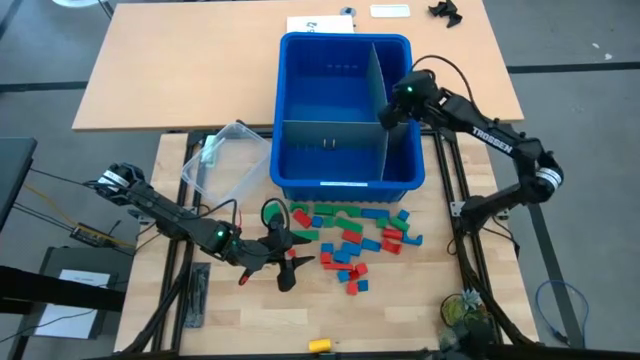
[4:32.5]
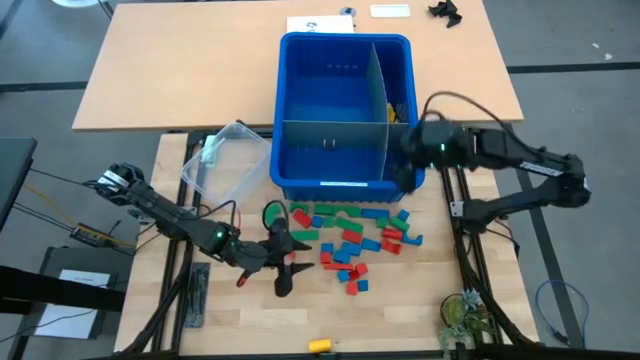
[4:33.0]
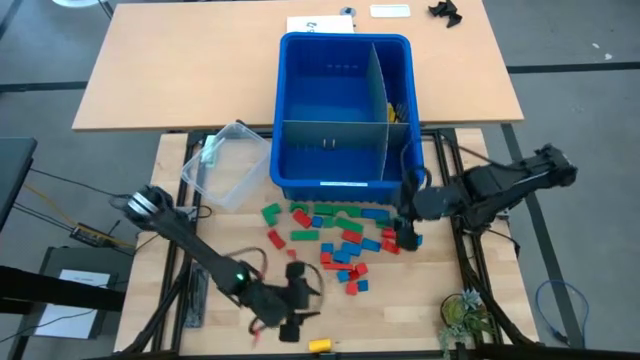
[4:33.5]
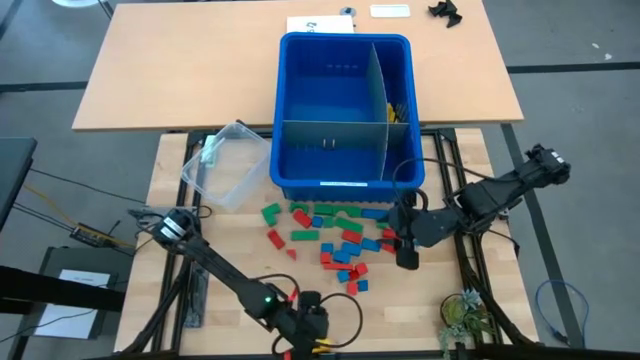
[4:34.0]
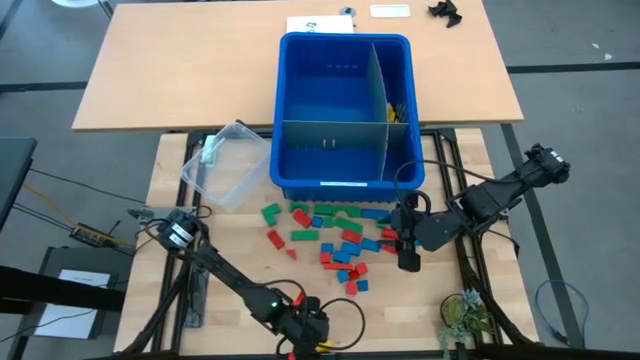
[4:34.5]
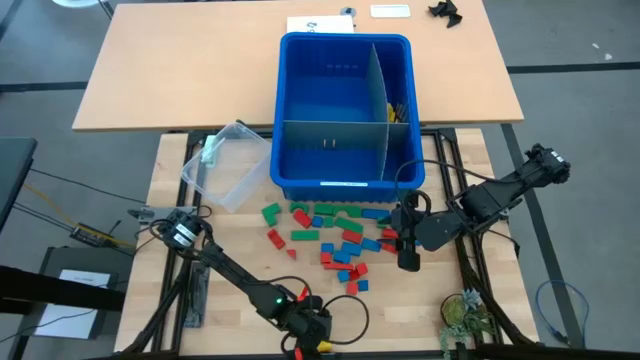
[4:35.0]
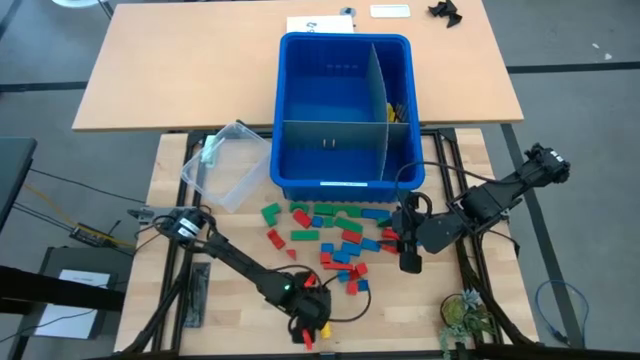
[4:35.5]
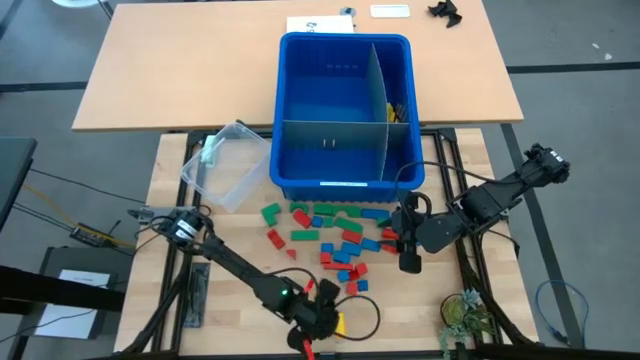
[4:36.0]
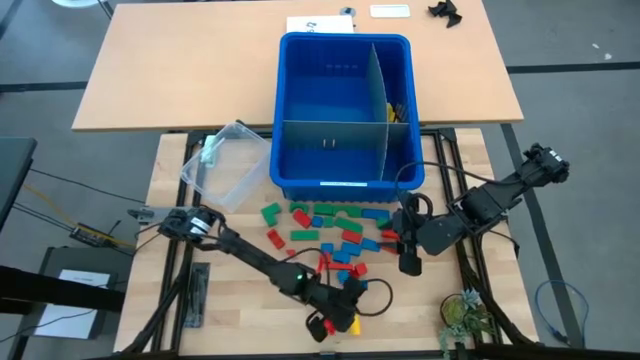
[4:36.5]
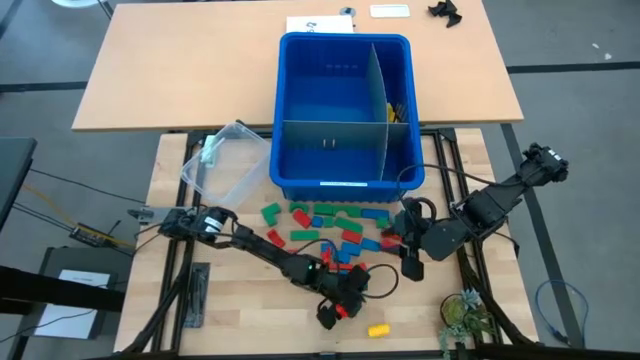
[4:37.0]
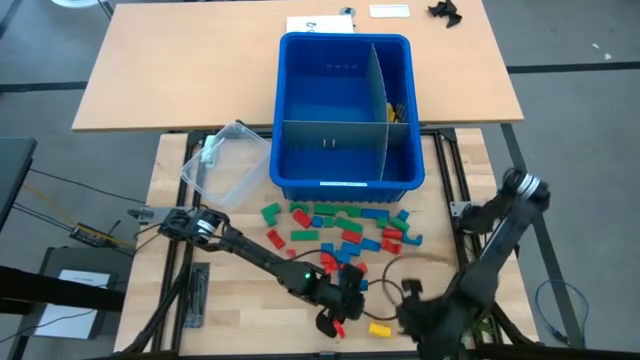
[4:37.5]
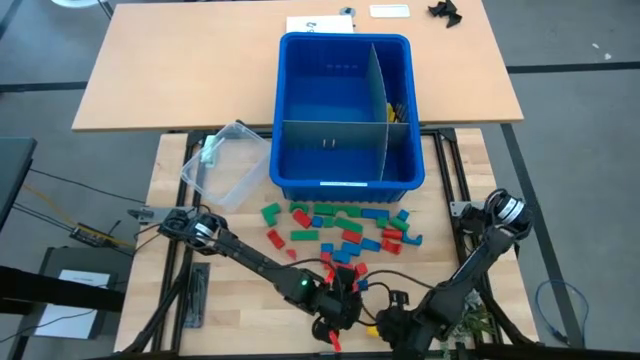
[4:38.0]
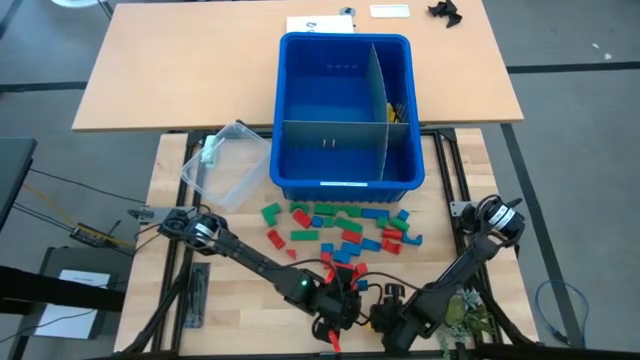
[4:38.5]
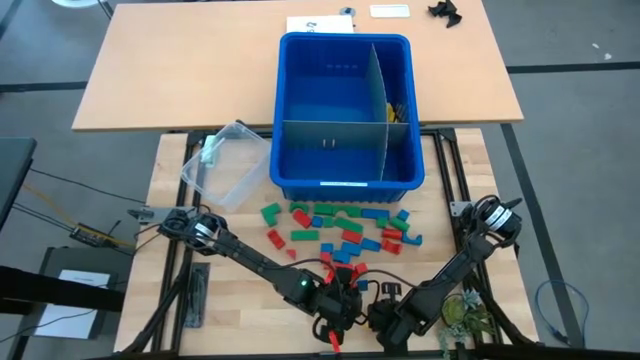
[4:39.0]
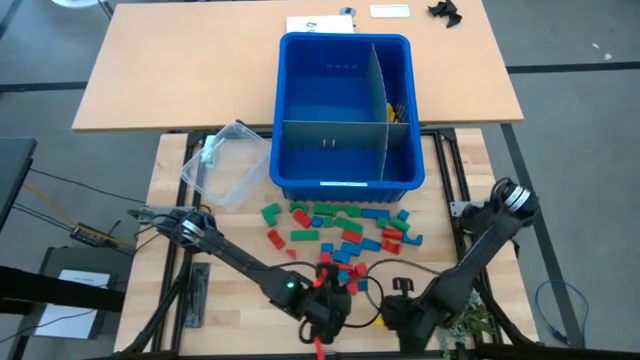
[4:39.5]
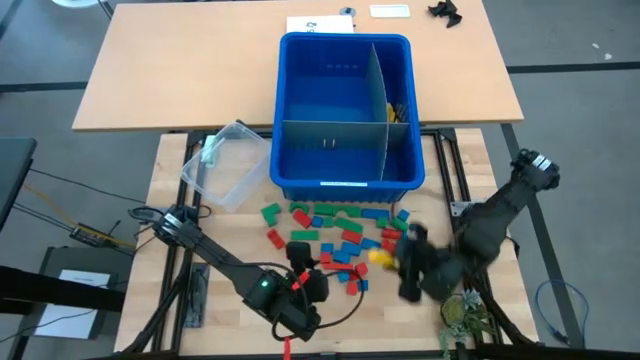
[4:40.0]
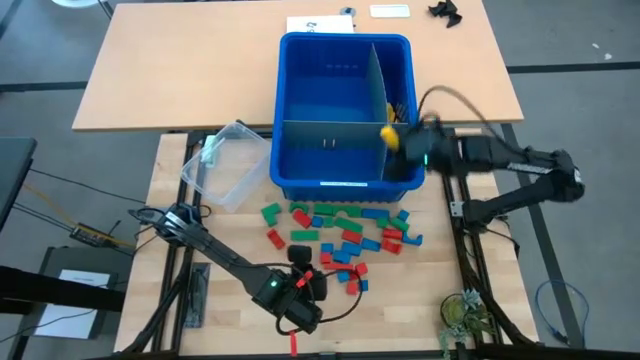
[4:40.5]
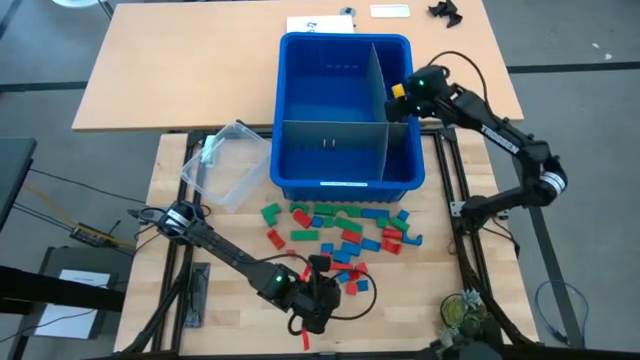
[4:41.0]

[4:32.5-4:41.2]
Task: Sort blocks
Put the yellow block into the blue bin

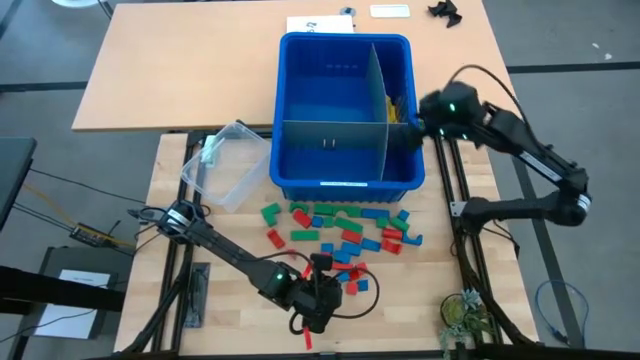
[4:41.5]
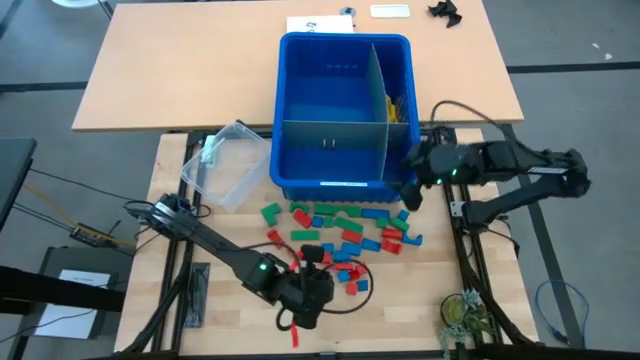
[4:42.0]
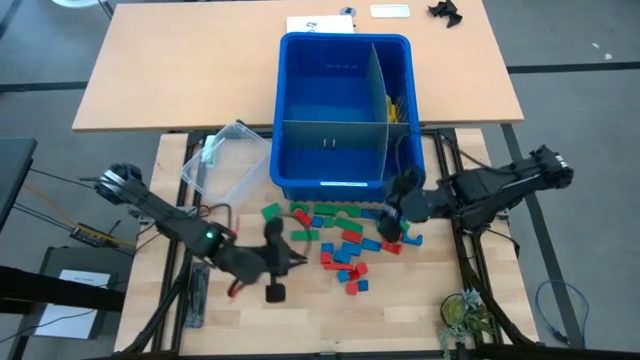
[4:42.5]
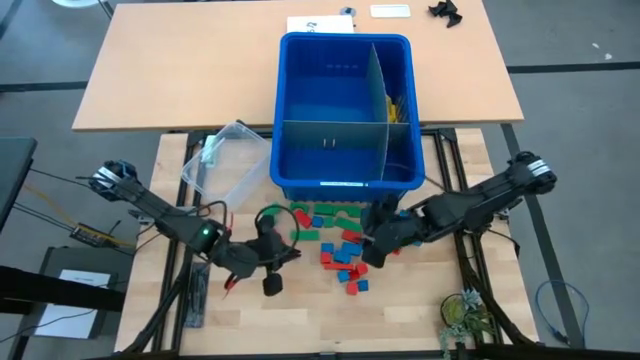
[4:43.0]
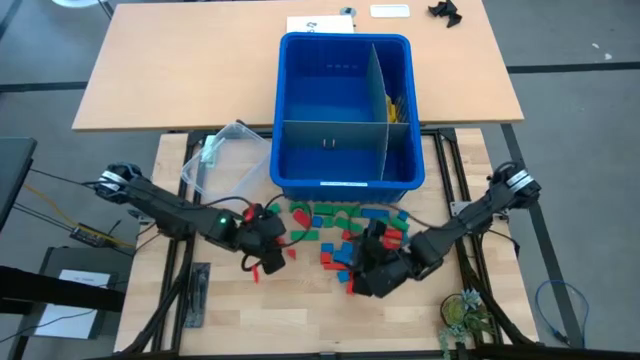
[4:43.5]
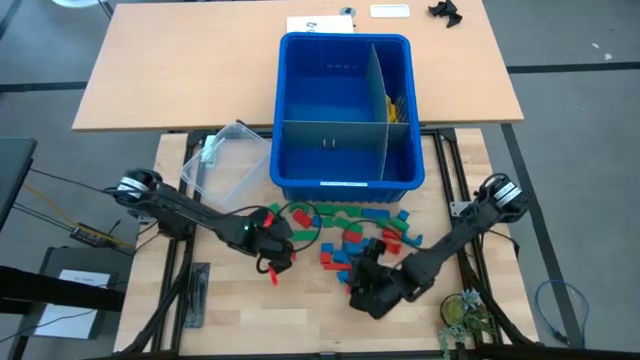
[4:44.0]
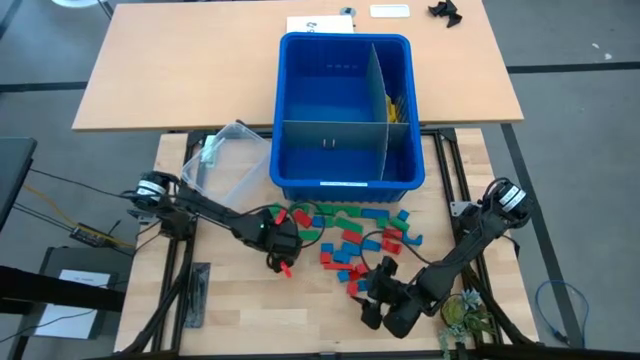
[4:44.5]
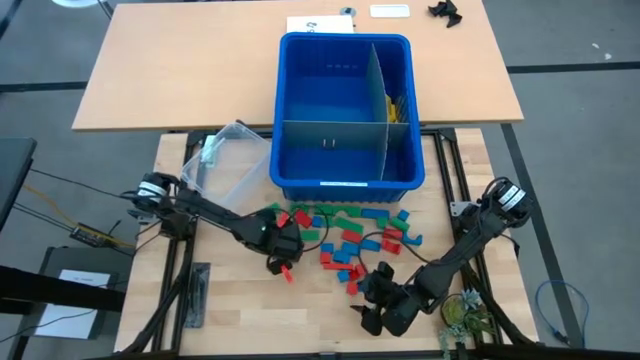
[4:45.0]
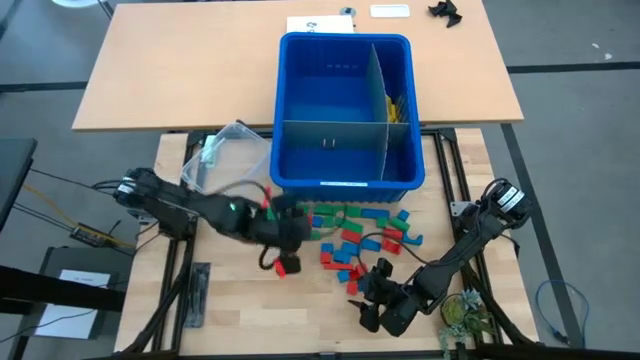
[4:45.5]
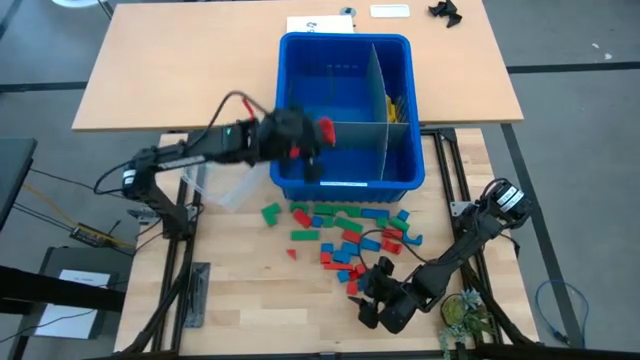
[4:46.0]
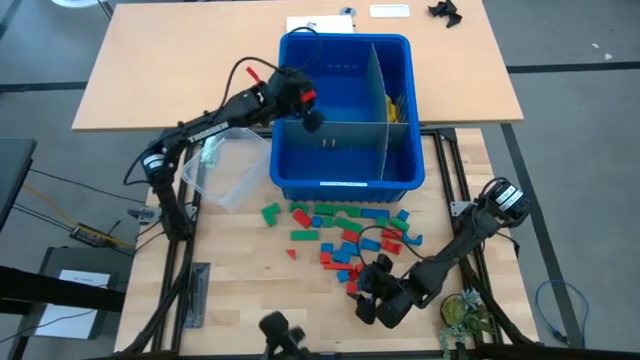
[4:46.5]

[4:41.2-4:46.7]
Put the red block into the blue bin

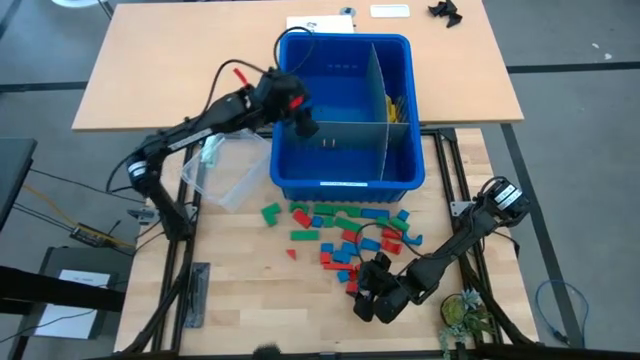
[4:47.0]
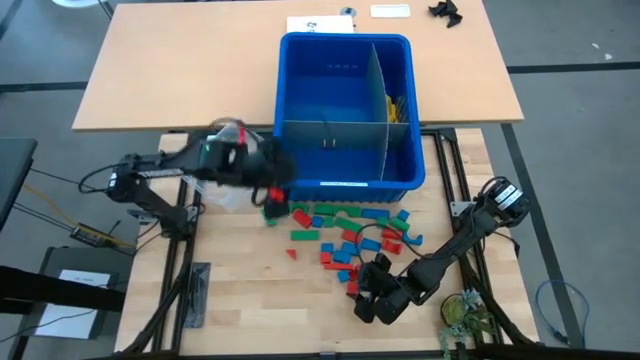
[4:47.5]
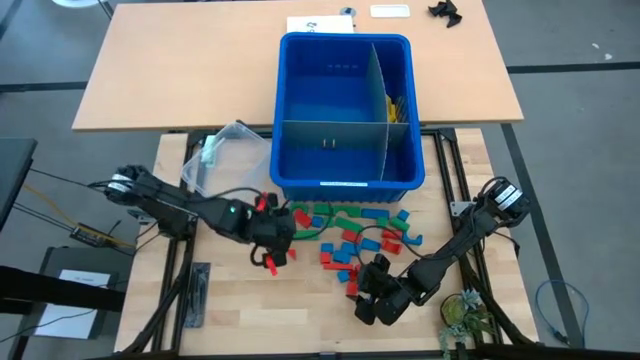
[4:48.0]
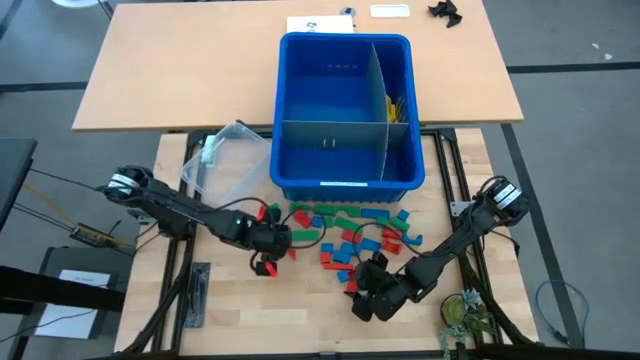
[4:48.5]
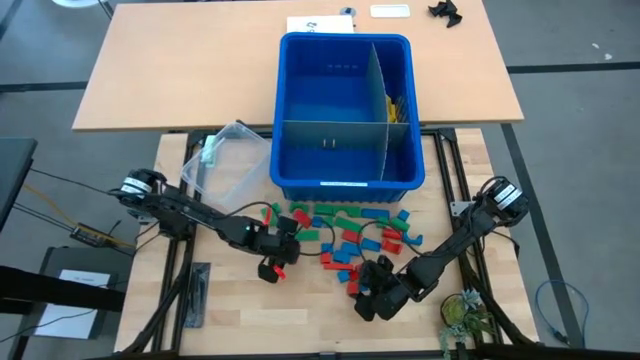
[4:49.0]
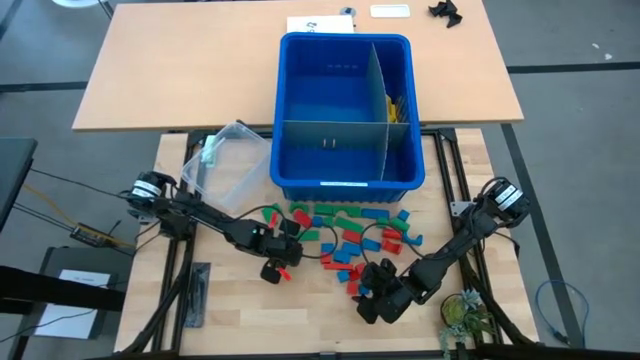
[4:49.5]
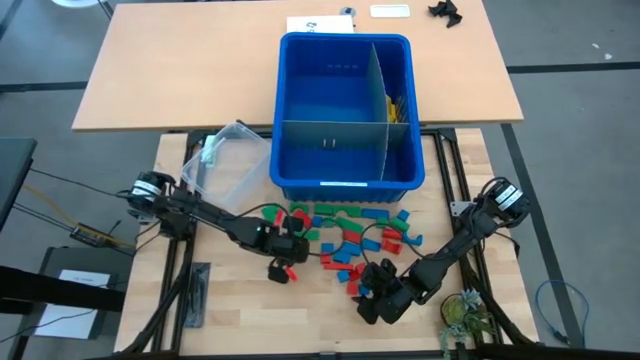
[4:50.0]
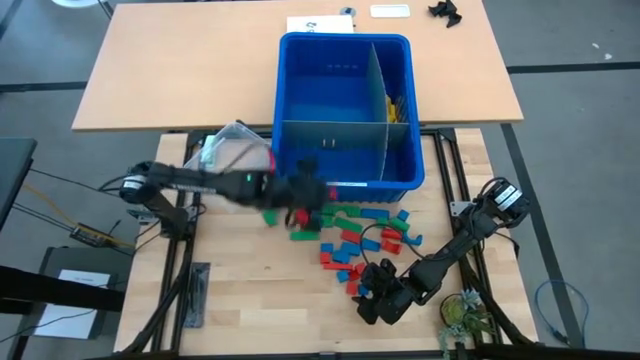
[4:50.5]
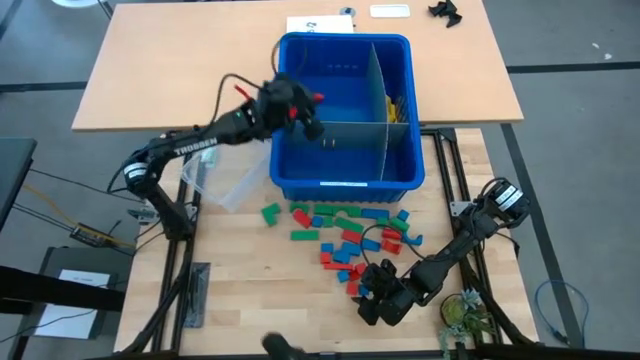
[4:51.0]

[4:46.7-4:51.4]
Put the red block into the blue bin

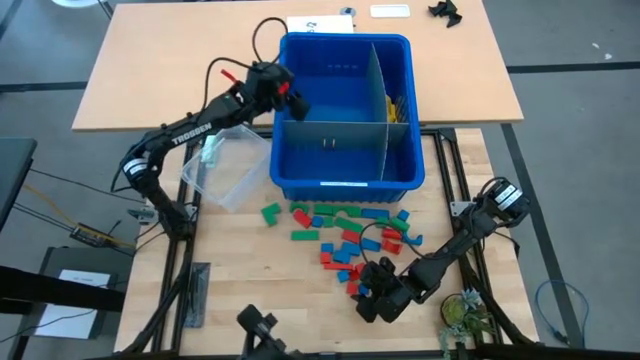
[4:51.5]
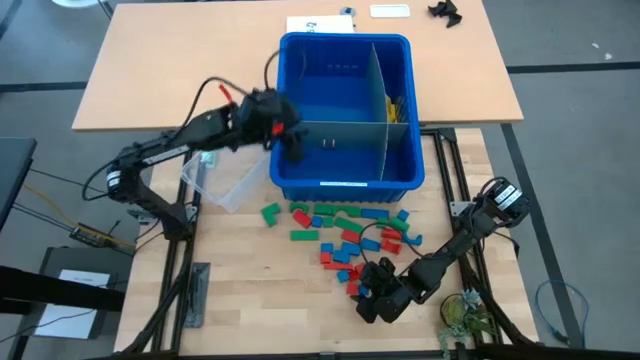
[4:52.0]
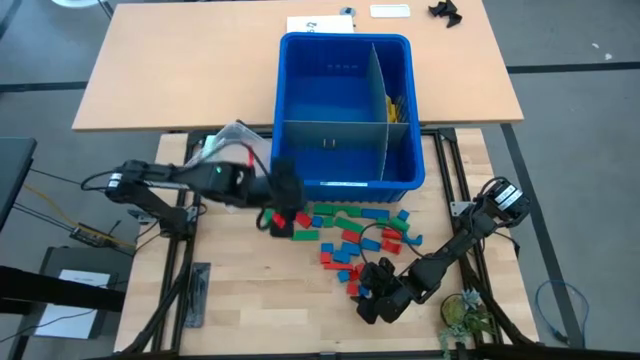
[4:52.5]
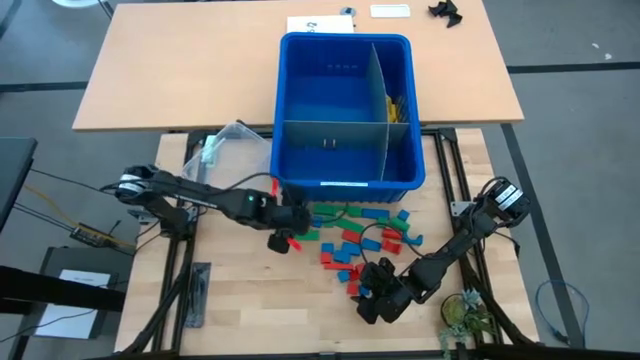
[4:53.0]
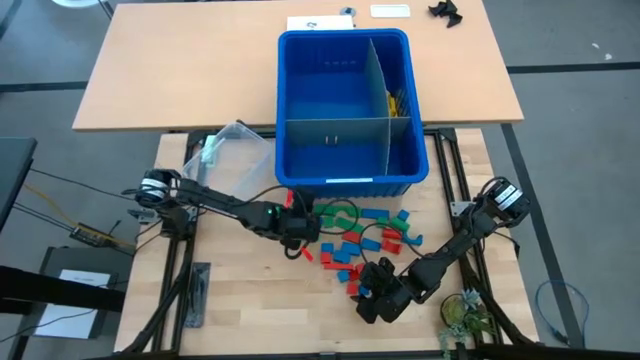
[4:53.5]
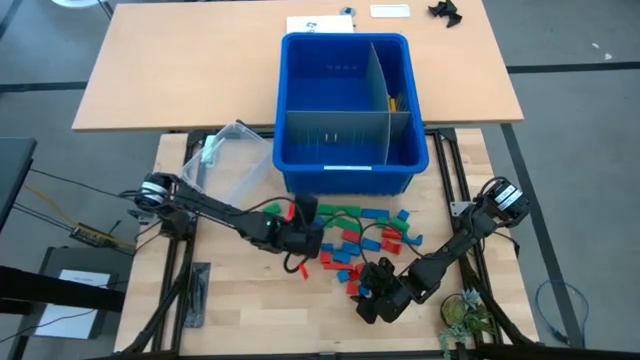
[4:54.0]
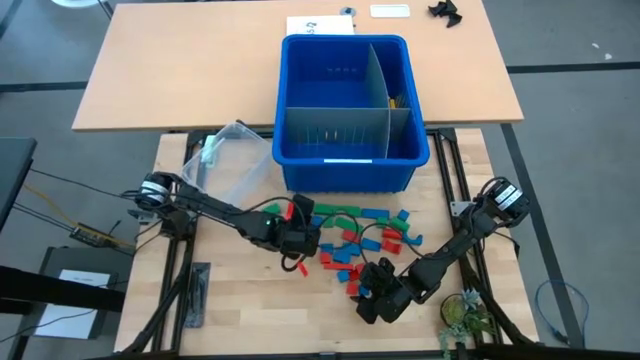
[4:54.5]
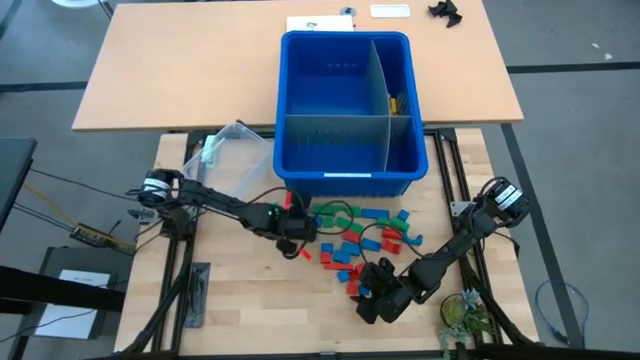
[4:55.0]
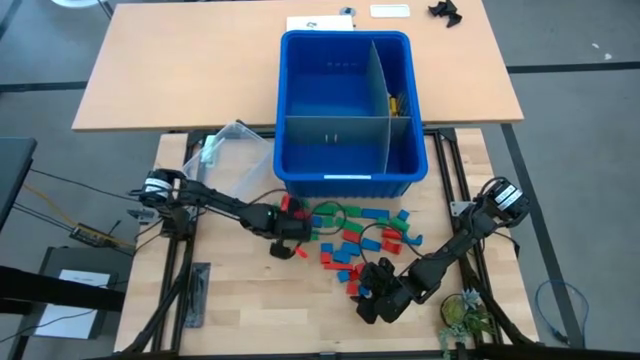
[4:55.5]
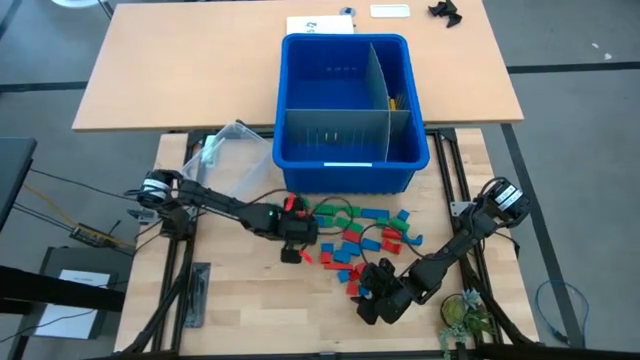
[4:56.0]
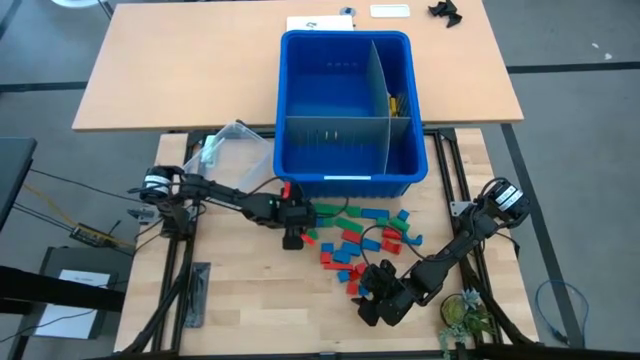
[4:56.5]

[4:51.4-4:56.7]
Put the red block into the blue bin
